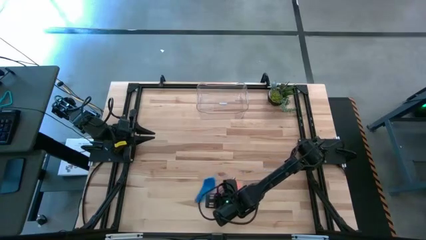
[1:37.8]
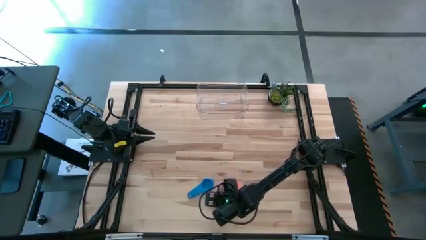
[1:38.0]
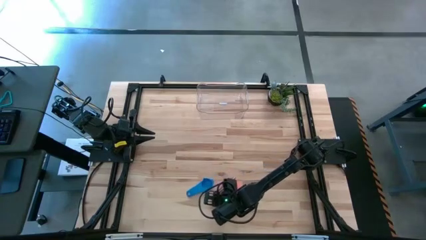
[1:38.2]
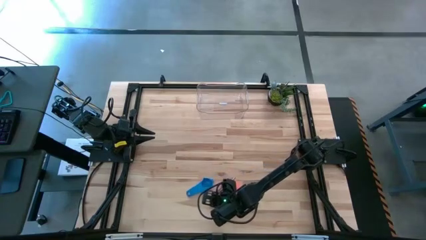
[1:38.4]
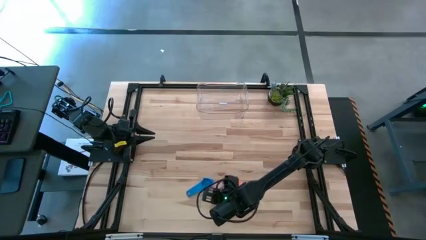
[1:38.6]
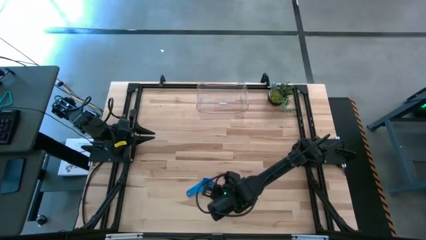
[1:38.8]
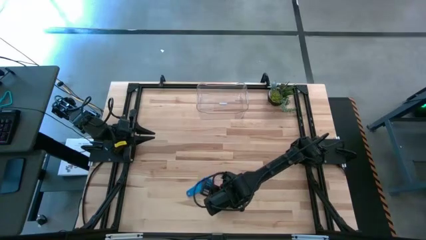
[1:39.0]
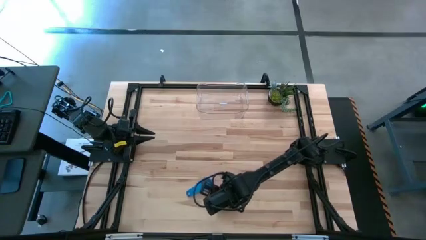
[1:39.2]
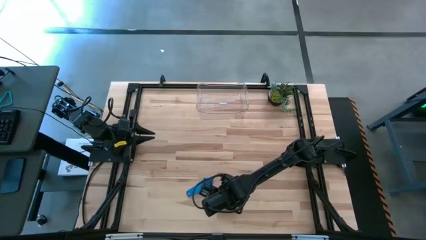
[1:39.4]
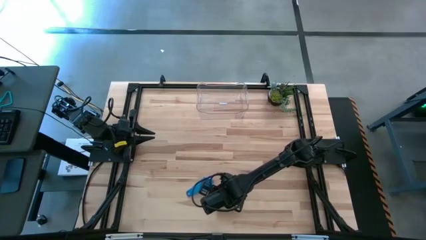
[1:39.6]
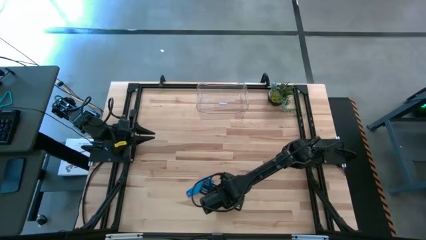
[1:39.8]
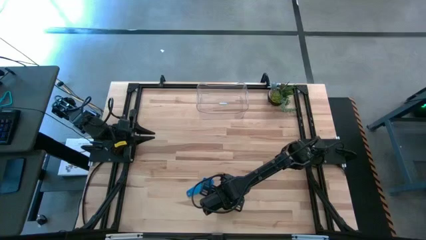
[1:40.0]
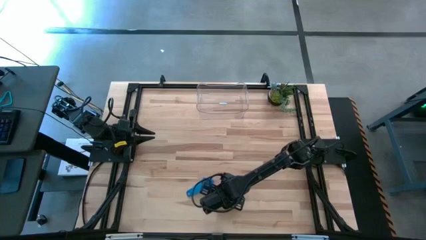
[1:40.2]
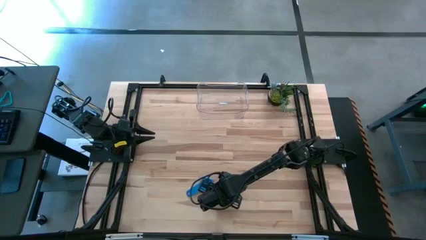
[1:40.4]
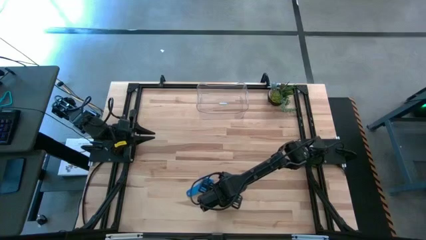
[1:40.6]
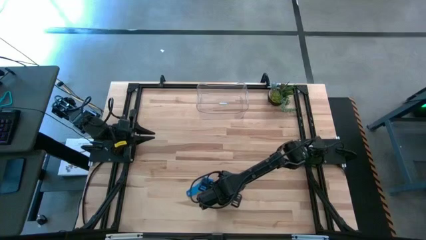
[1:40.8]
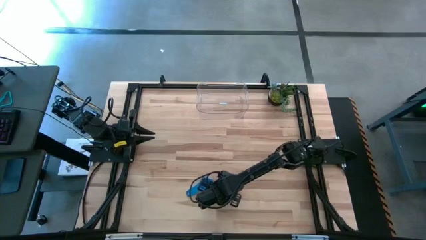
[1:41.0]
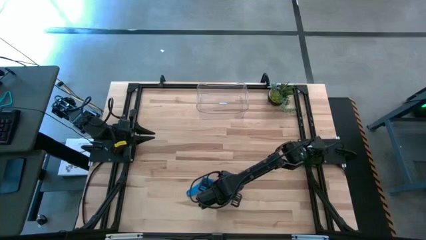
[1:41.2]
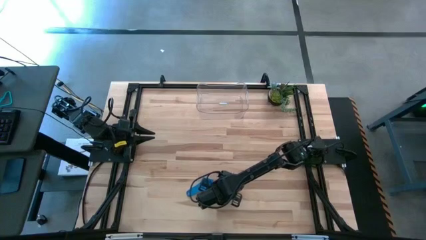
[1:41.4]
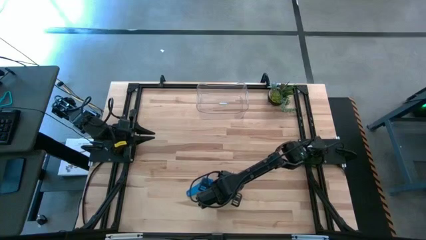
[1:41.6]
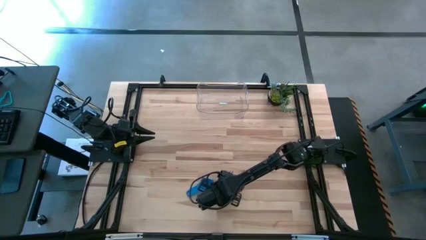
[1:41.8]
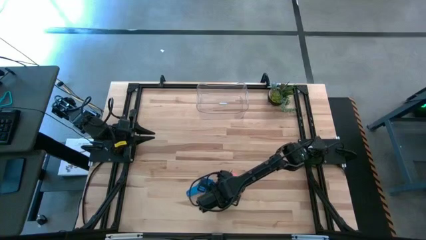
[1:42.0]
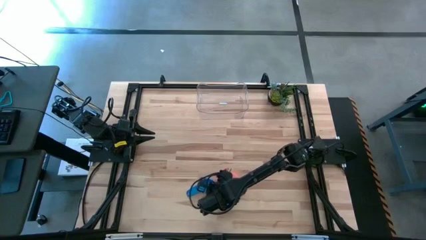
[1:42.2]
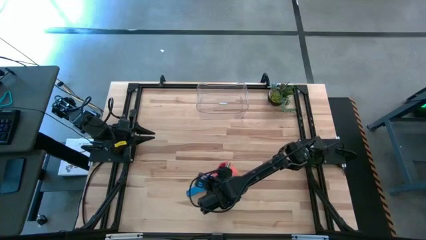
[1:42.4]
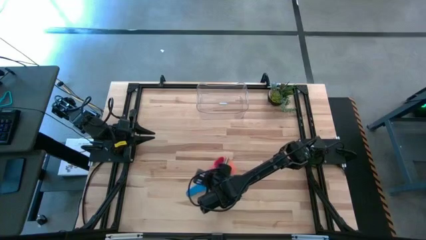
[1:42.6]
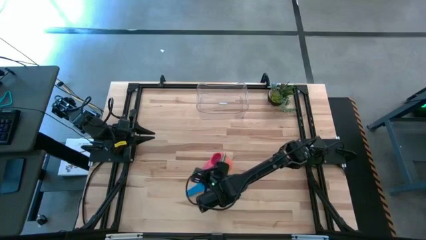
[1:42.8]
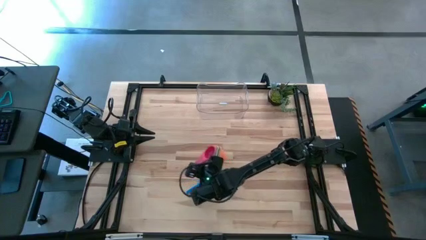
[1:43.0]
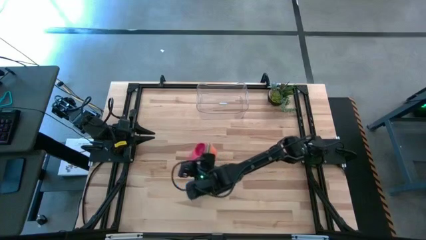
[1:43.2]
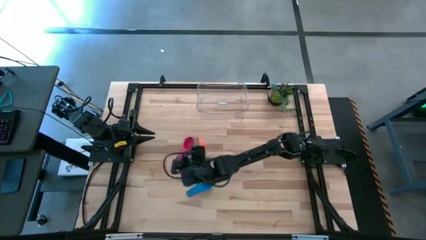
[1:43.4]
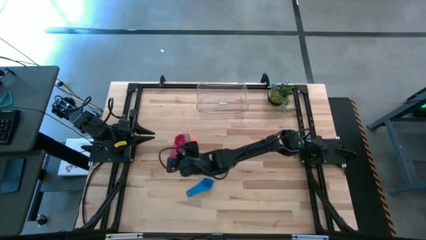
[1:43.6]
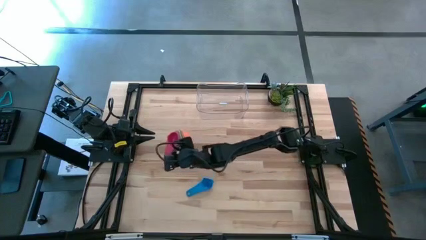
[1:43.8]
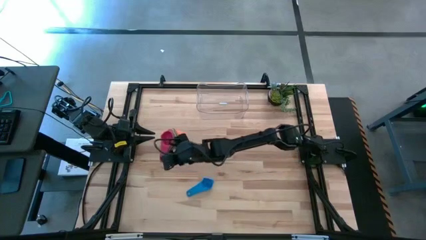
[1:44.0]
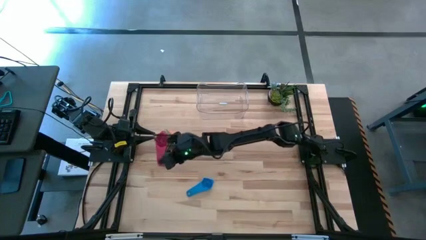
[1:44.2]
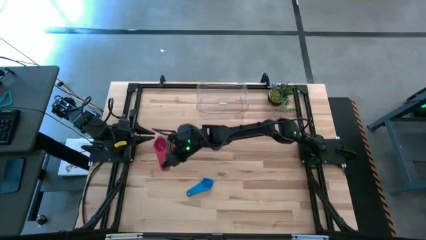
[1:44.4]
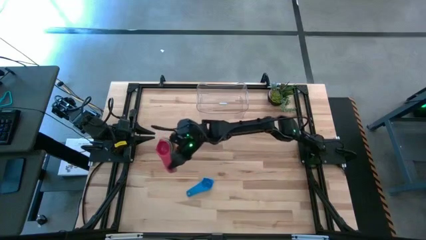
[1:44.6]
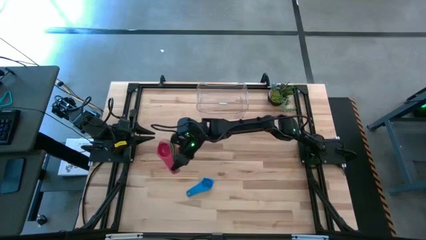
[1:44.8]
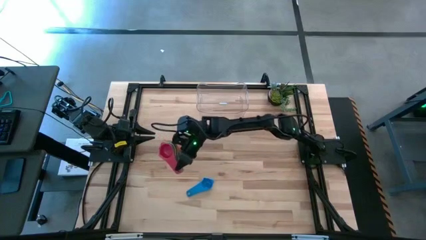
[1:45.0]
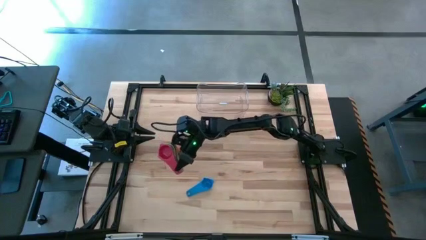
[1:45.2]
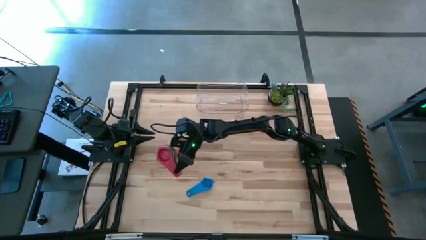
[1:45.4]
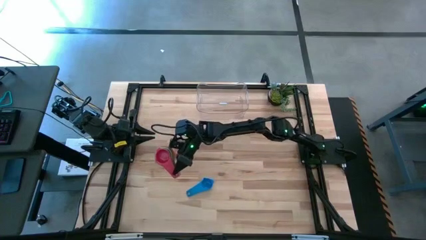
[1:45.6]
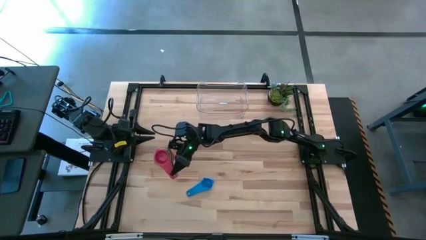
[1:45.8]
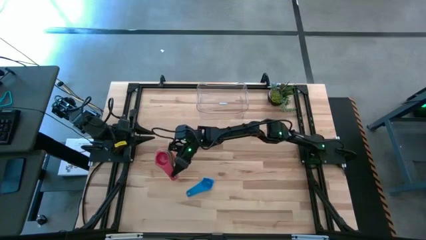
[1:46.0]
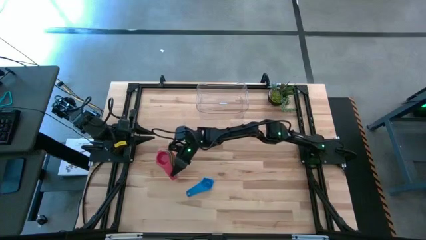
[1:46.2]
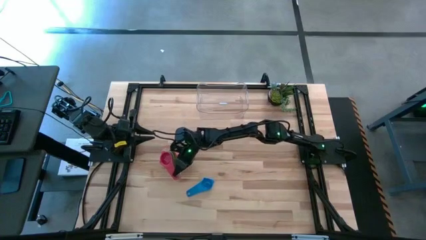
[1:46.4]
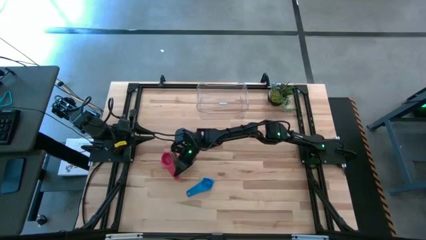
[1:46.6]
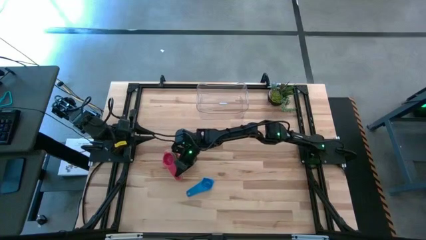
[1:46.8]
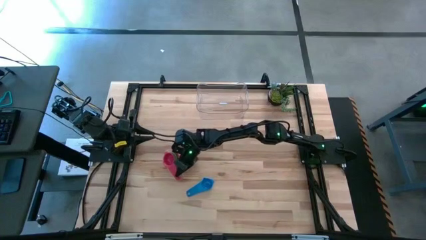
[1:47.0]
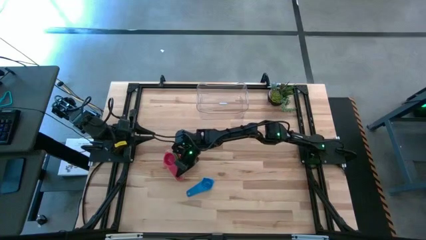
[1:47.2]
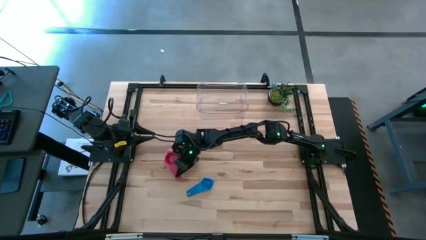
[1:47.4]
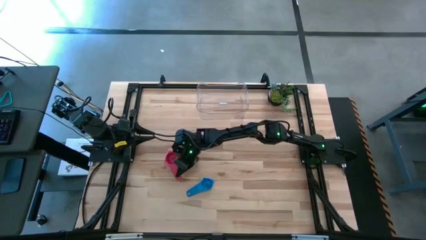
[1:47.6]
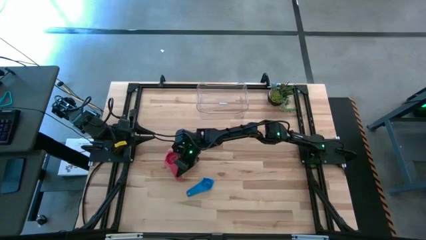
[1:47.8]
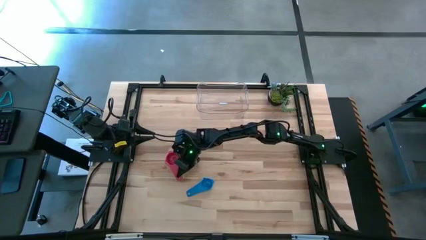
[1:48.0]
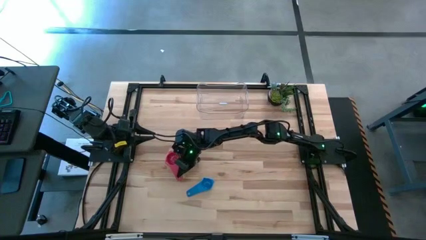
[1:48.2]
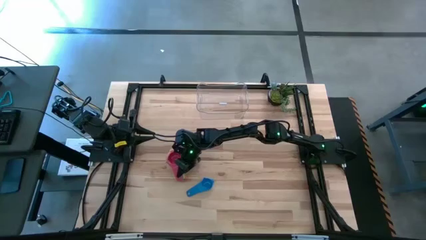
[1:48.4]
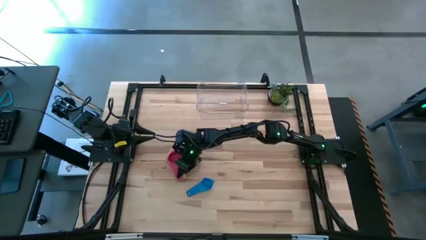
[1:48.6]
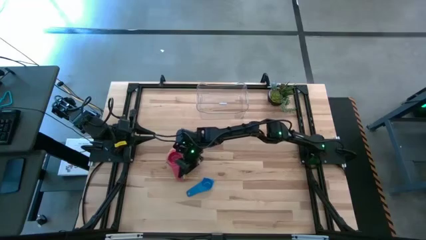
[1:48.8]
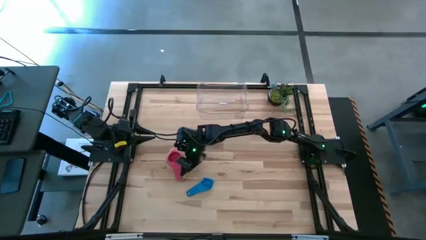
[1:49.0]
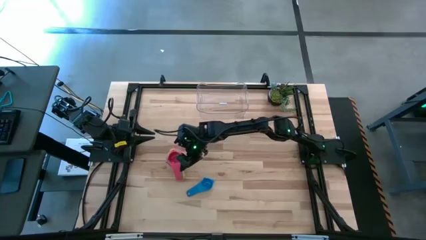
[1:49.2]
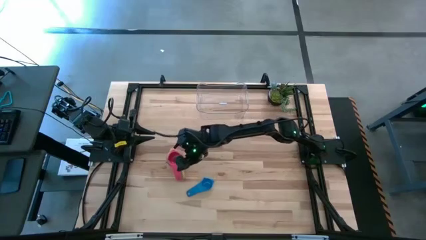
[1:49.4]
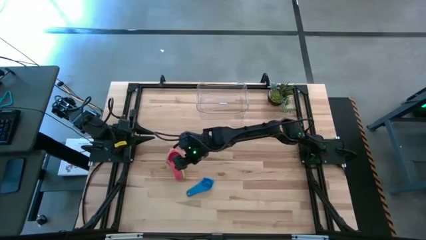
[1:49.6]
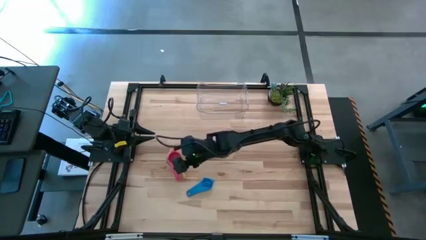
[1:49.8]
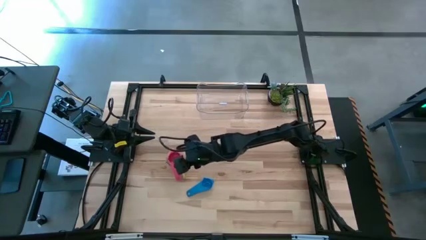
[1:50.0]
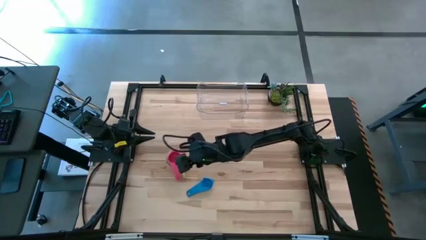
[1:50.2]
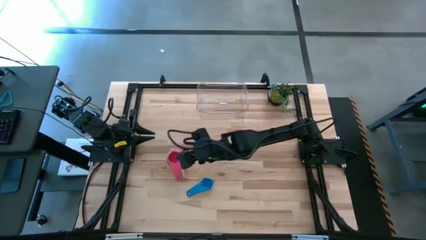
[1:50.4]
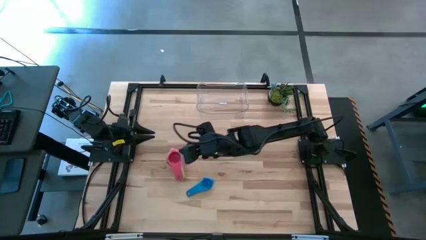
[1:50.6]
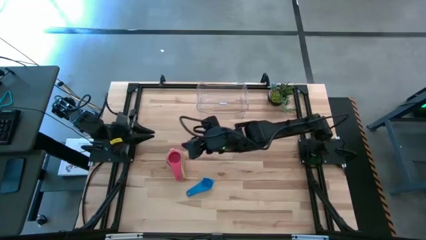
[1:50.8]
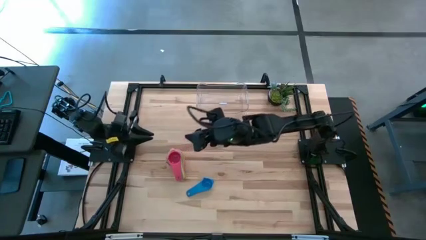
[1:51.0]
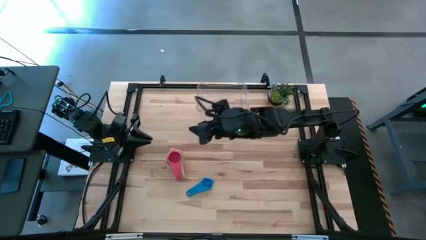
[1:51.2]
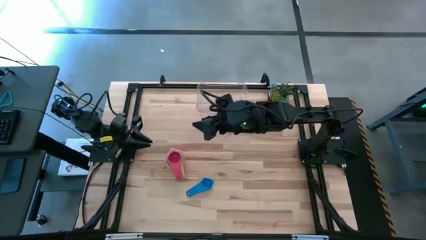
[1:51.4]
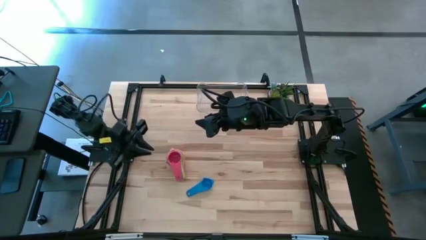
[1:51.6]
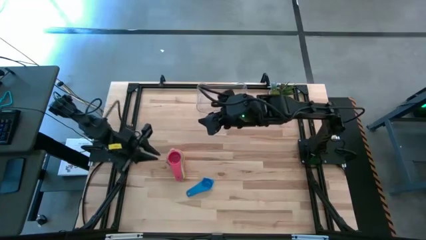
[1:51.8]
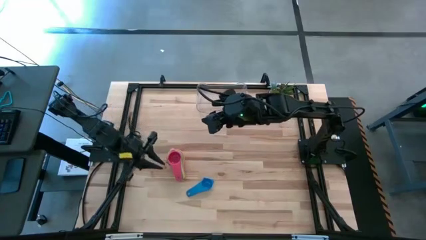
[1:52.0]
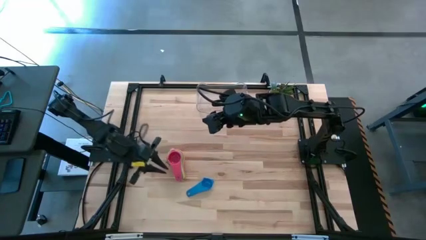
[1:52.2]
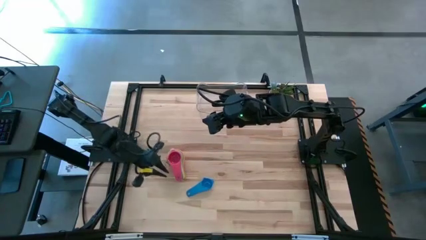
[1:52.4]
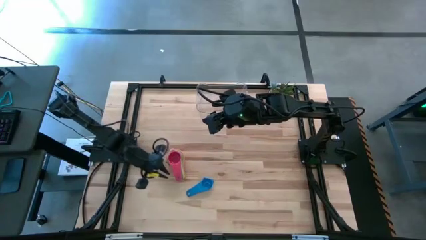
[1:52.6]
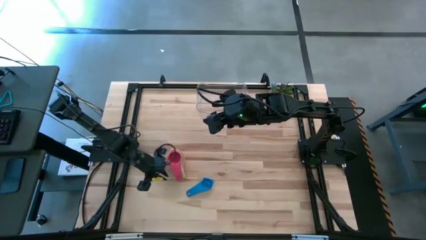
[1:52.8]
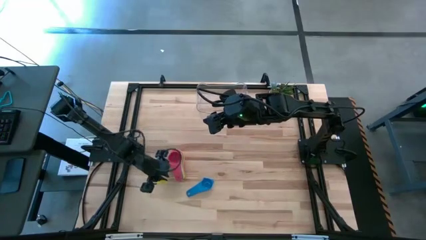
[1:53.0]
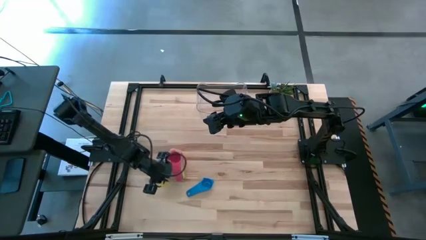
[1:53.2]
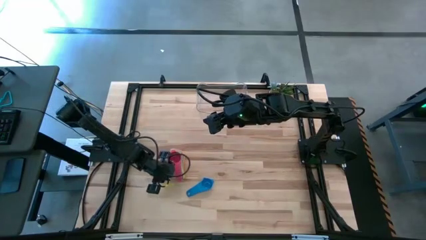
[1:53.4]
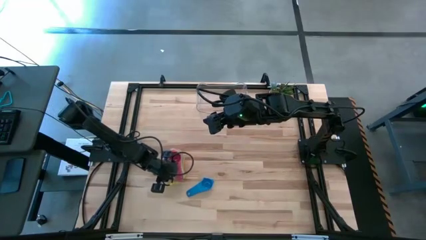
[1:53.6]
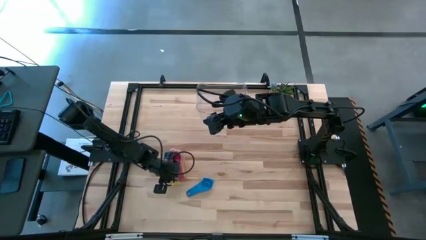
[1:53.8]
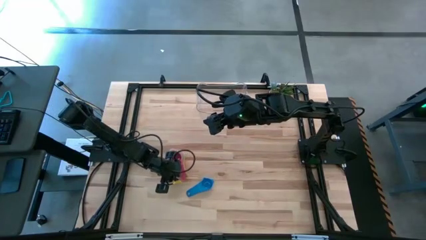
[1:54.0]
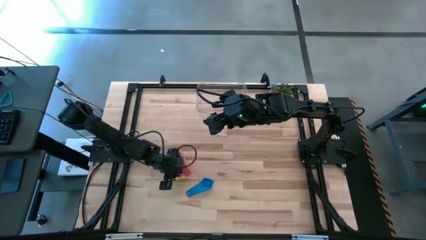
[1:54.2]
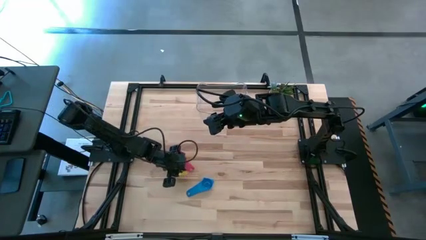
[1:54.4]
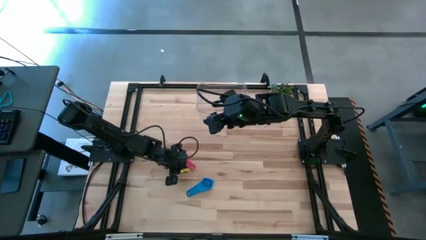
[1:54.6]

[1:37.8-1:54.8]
Task: Nest measuring cups in basket
Adjust the nested measuring cups
